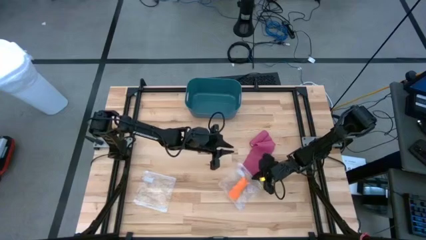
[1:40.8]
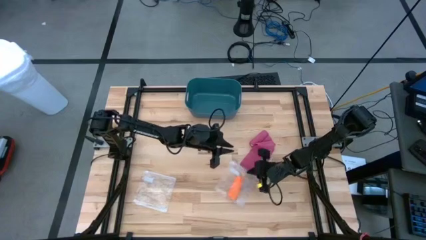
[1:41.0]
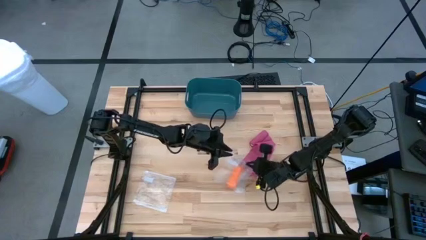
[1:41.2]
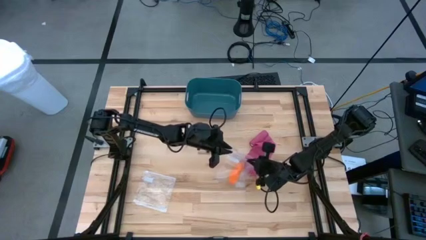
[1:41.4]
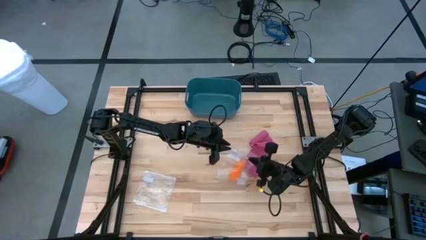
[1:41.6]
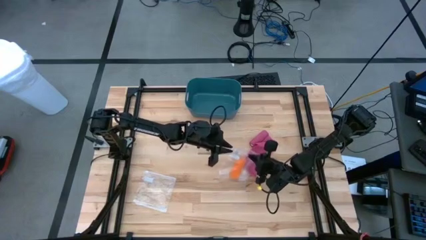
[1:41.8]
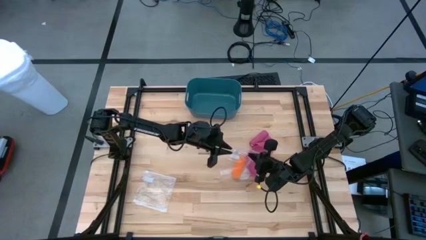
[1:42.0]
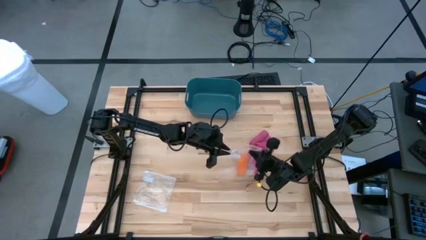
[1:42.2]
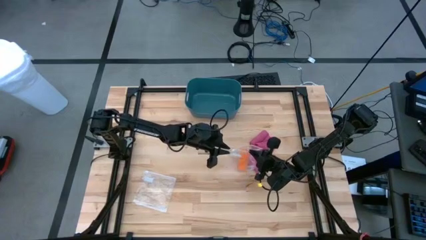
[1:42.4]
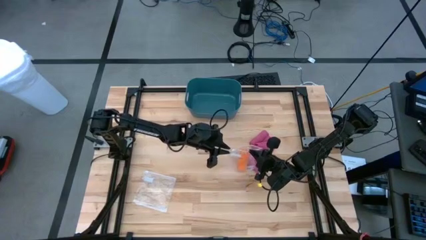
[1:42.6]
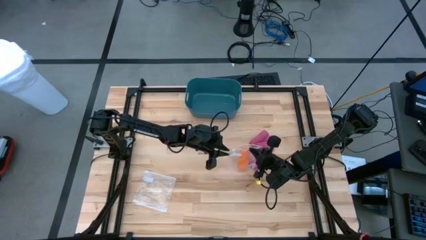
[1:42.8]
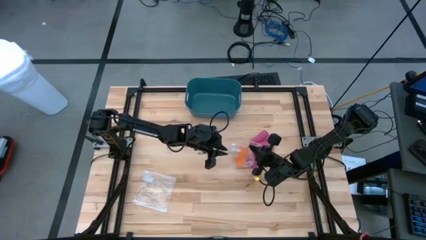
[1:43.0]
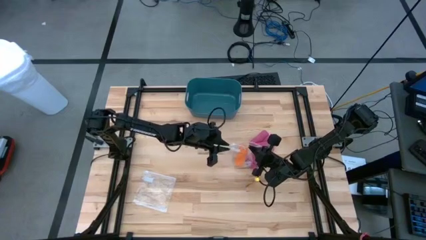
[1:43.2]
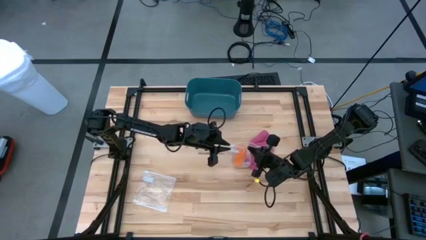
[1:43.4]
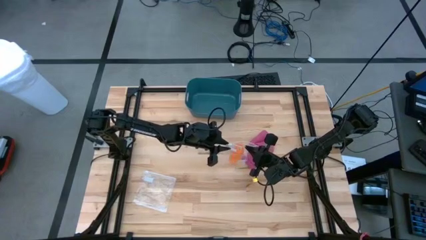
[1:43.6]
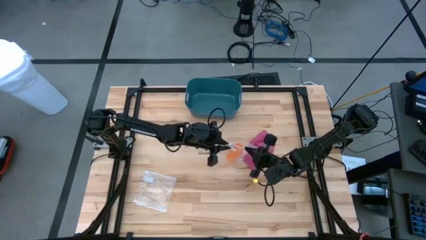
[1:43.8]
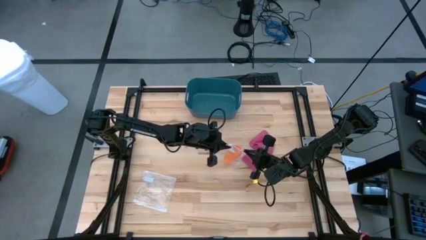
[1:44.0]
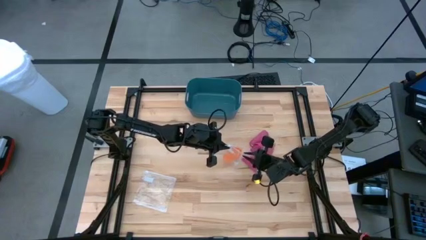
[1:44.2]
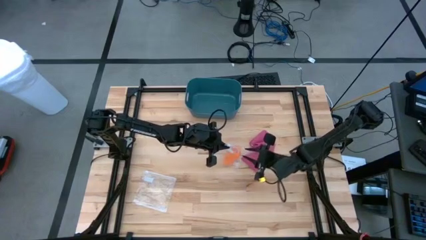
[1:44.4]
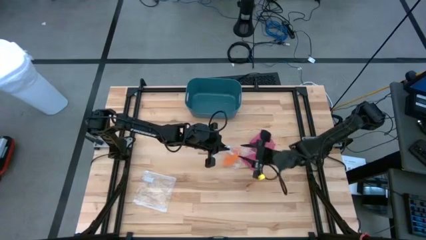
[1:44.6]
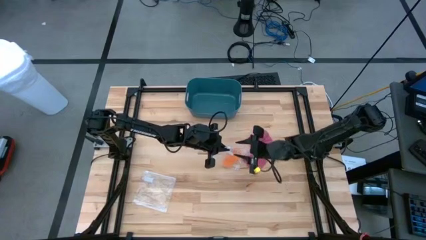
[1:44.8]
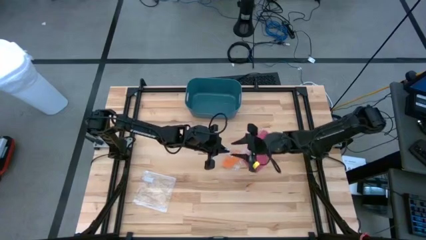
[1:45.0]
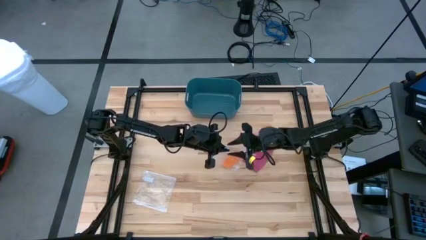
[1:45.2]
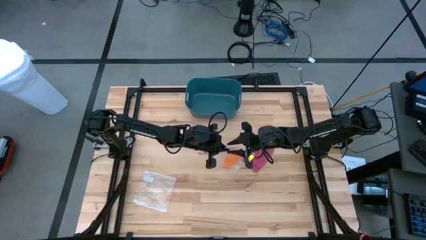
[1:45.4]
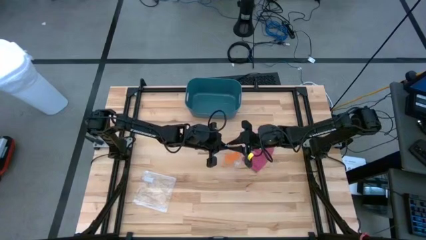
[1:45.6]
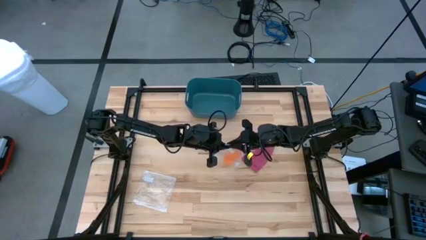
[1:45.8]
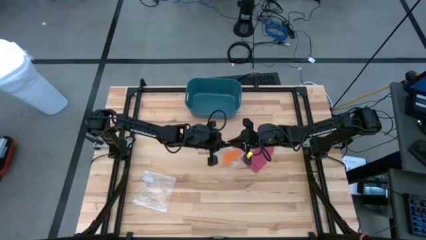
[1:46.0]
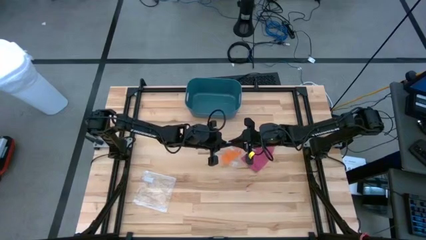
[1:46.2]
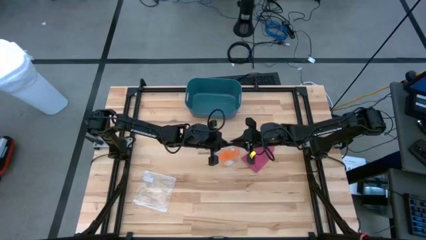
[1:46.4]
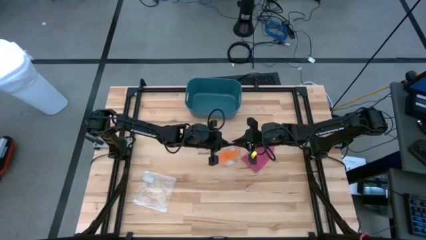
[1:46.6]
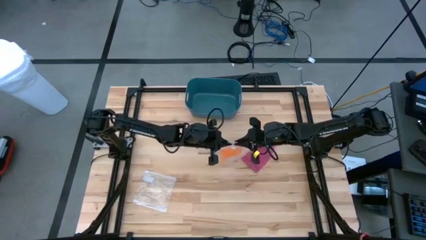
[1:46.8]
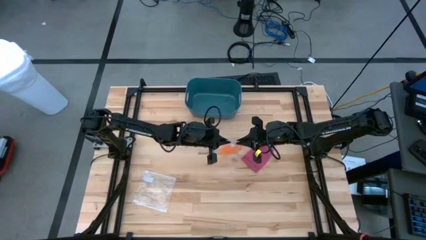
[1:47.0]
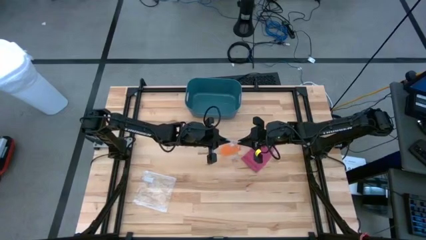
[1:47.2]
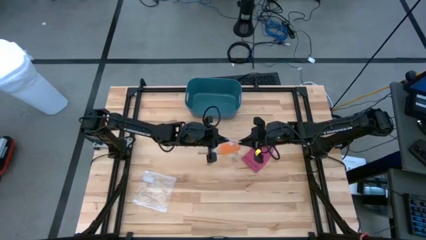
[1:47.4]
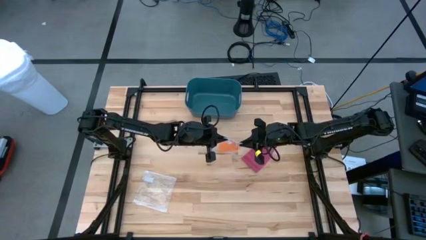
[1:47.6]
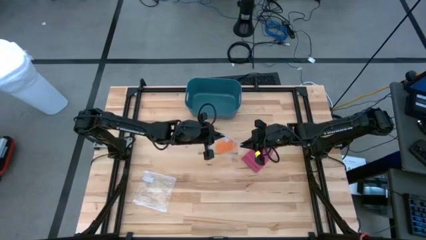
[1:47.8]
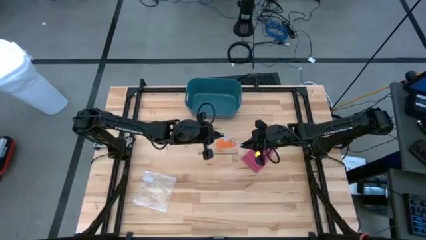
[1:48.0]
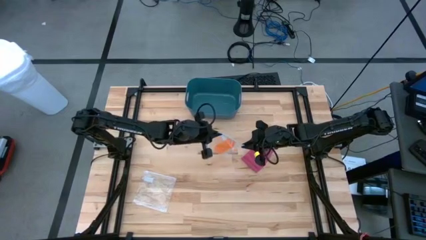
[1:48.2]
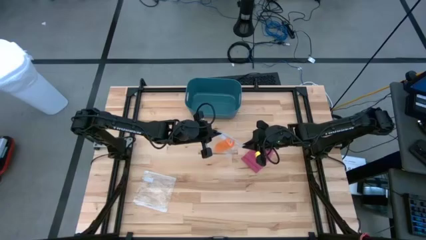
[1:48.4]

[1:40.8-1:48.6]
Task: Roll bandage
Close the transparent zip lock containing the rolled orange bandage

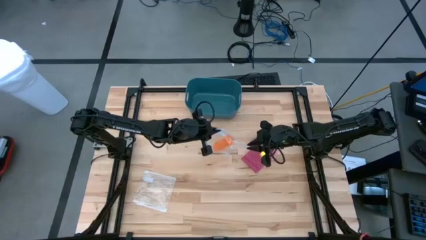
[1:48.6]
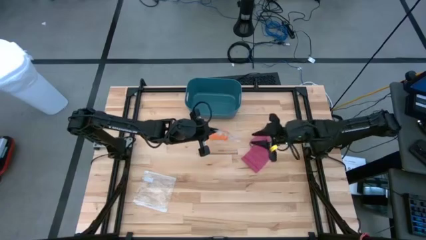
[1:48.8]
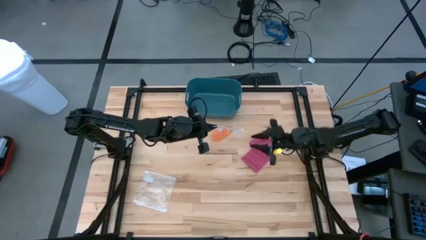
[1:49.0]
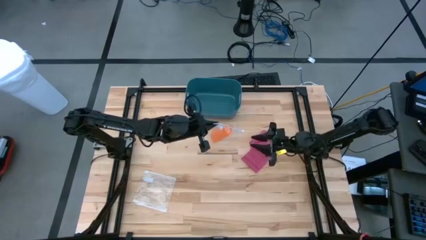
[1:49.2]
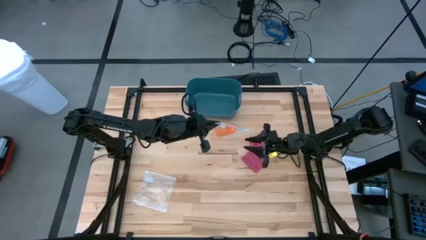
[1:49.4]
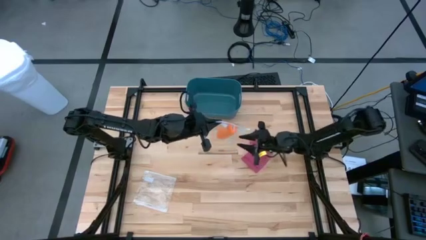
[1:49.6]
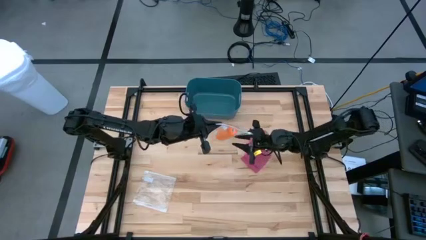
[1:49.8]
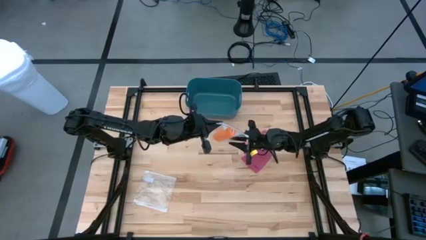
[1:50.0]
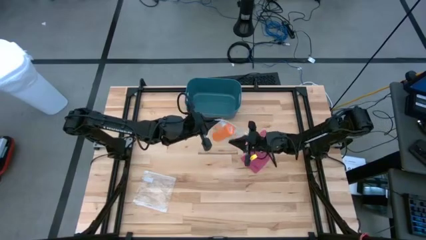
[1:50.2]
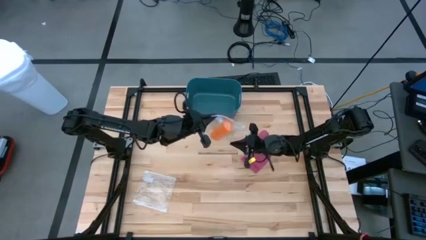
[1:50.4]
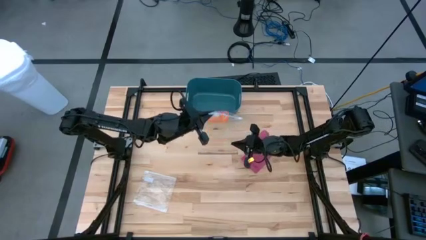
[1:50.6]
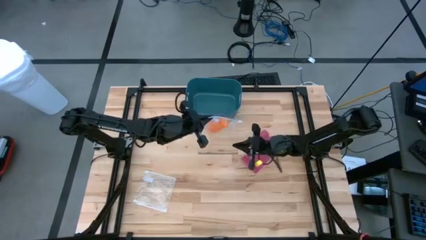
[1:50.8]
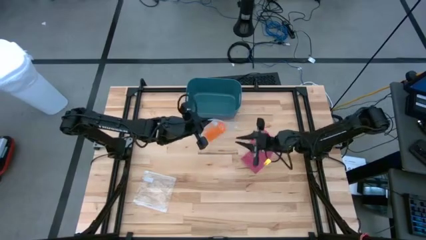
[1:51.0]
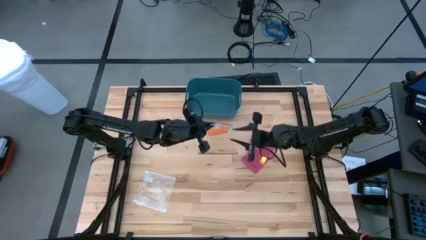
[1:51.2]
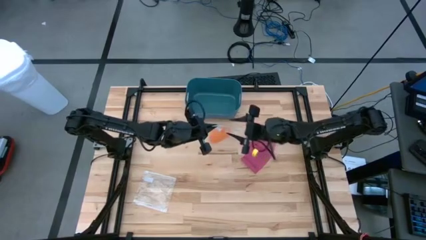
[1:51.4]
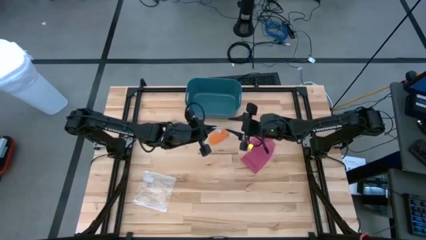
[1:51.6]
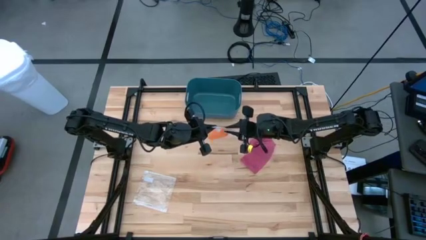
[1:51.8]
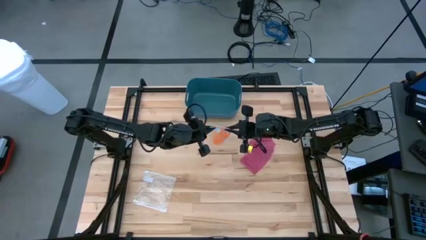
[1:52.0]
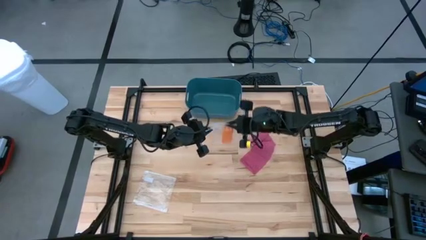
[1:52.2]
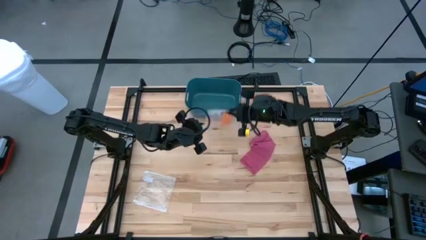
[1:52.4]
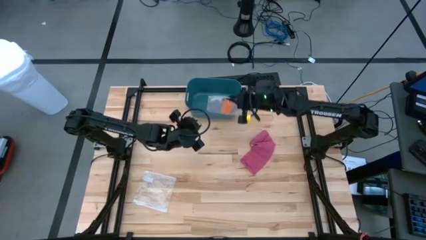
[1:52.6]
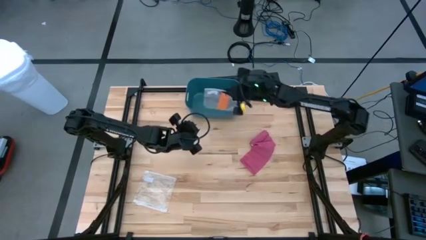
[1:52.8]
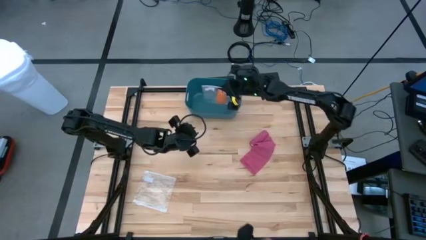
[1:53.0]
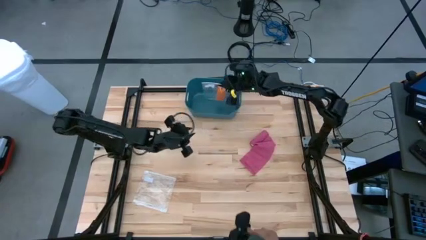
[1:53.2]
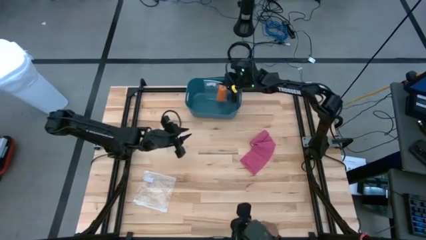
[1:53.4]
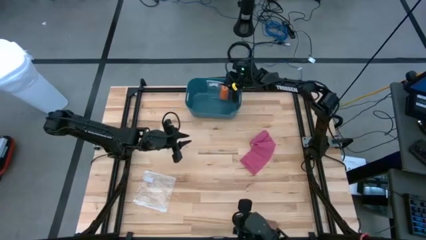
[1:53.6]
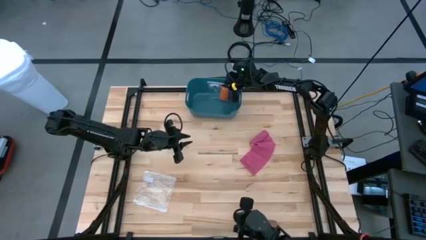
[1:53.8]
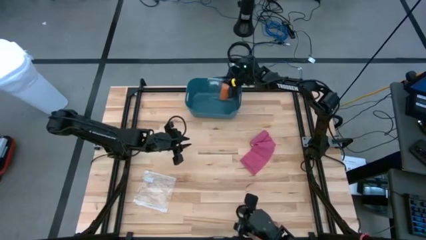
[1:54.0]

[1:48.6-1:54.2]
Put the transparent zip lock containing the rolled orange bandage into the blue bin
